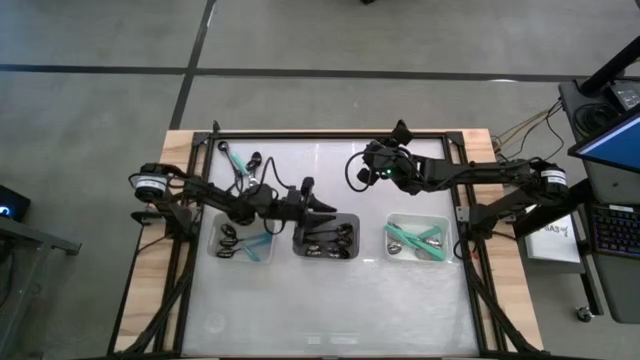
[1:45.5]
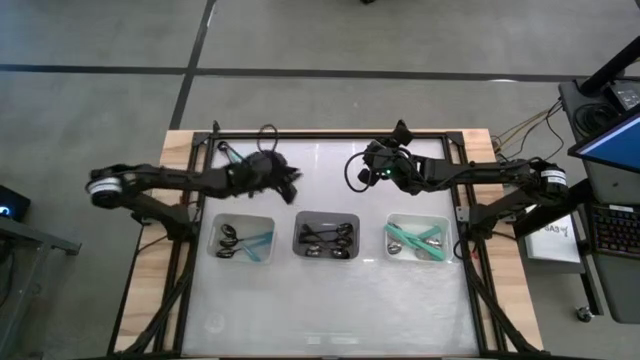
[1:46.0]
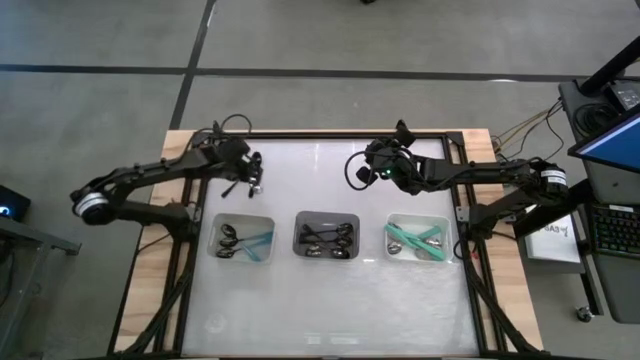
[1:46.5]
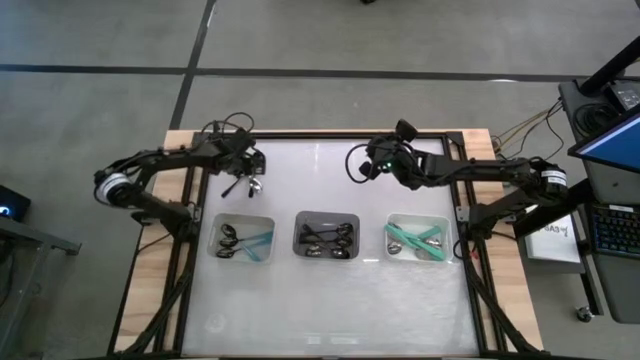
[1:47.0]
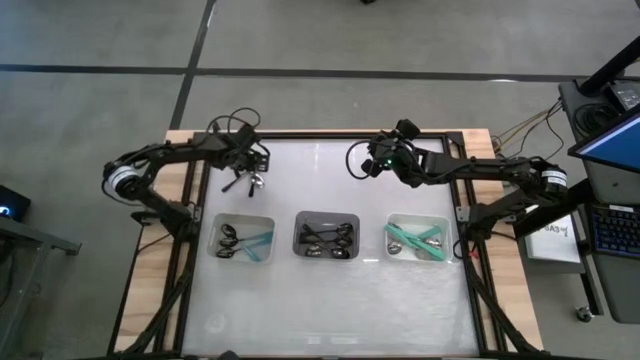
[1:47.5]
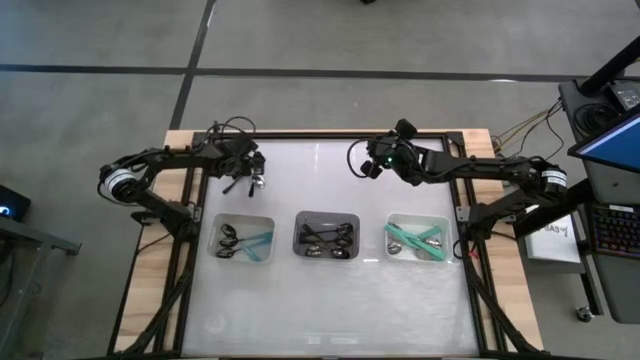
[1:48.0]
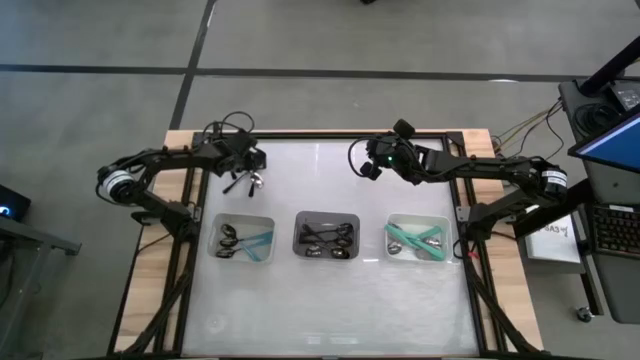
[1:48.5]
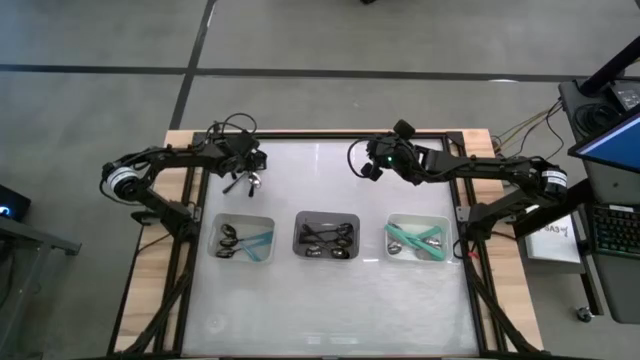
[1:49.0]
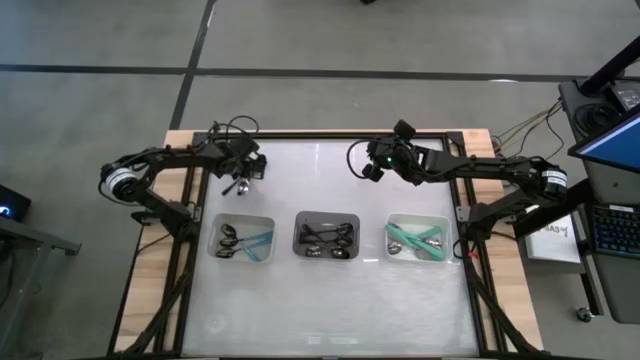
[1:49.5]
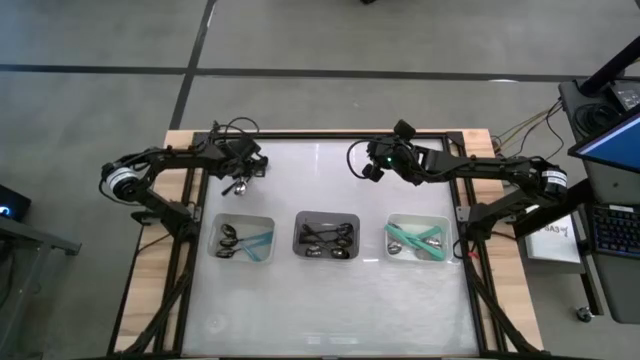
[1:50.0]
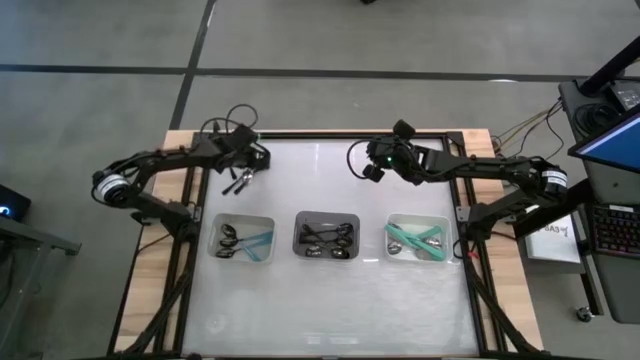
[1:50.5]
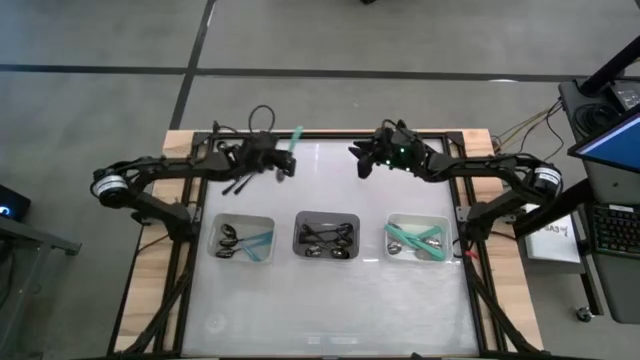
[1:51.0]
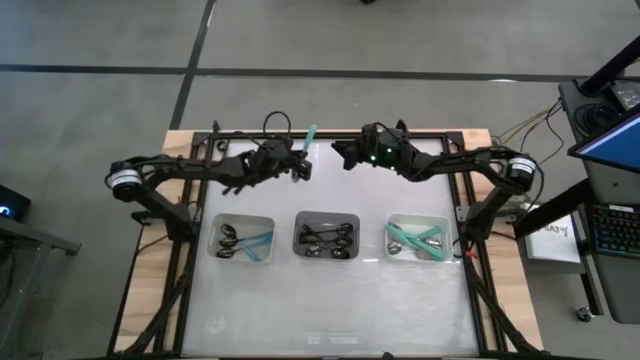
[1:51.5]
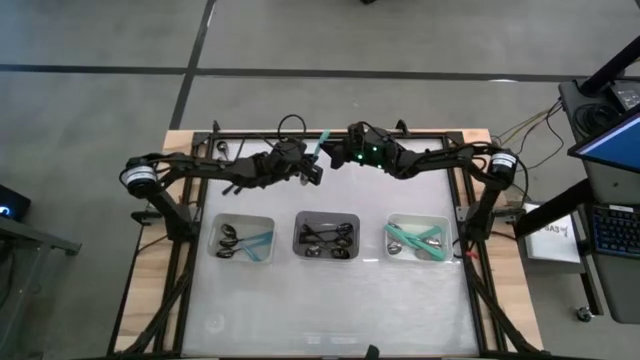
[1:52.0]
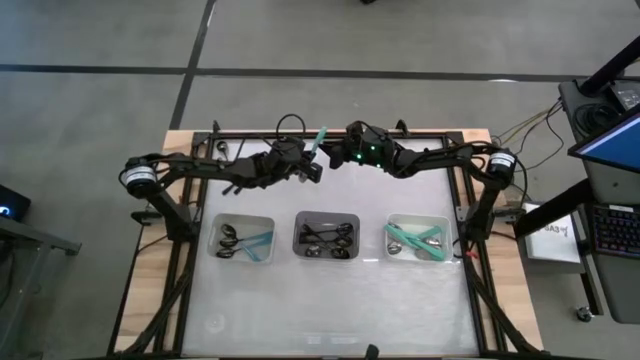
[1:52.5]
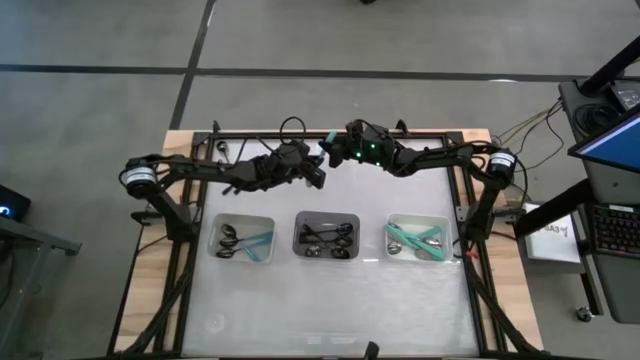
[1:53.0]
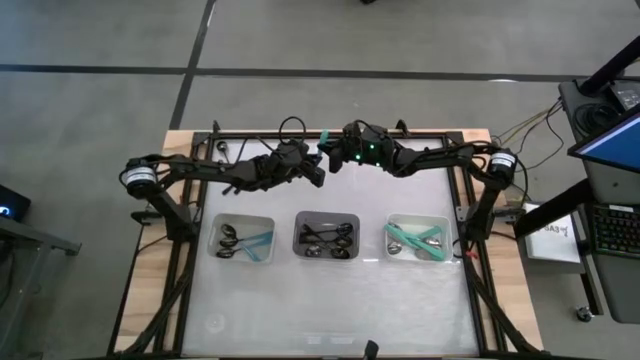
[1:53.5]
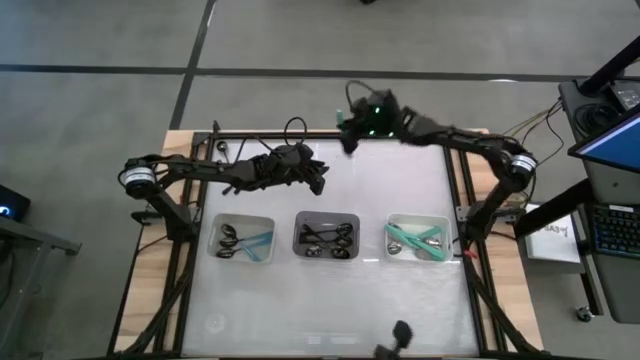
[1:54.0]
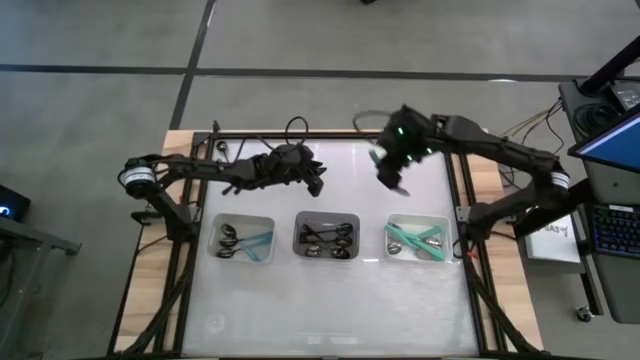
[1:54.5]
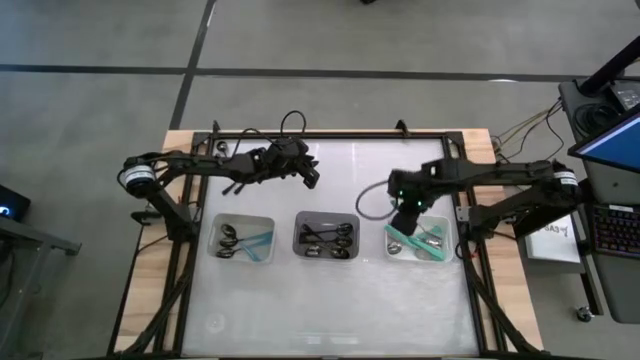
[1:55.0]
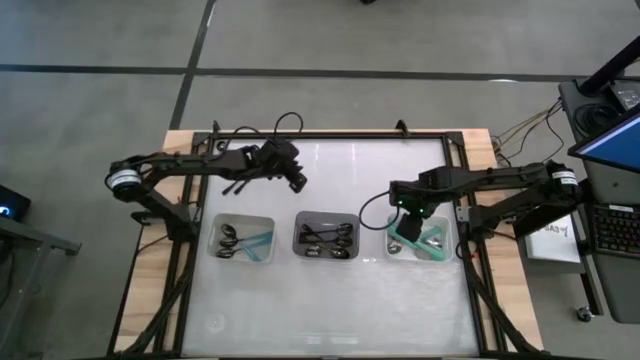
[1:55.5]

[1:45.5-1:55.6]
Task: Sort silverware by color (type)
Put the green spoon into the white bin

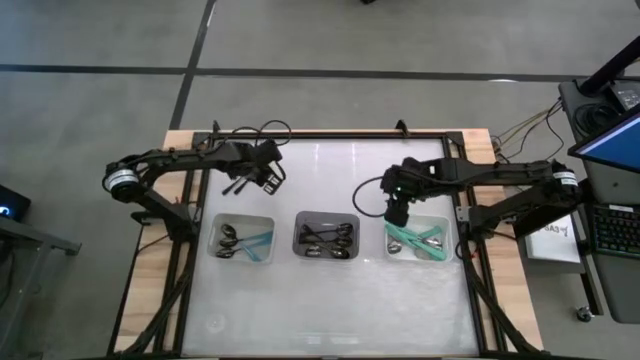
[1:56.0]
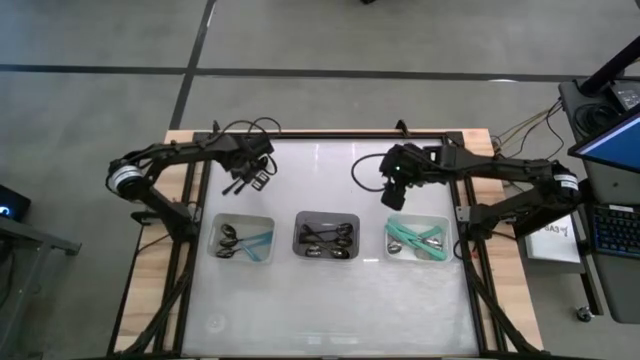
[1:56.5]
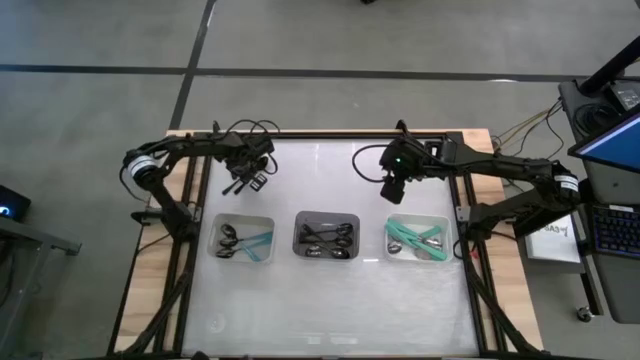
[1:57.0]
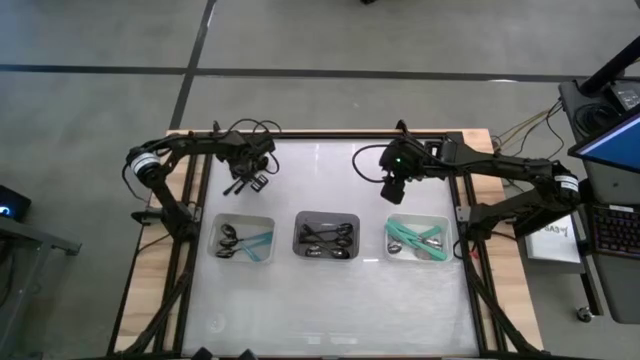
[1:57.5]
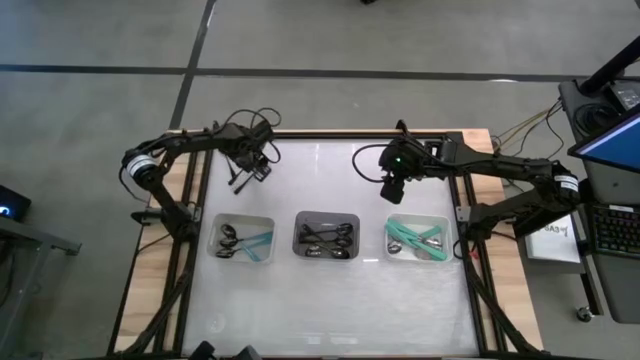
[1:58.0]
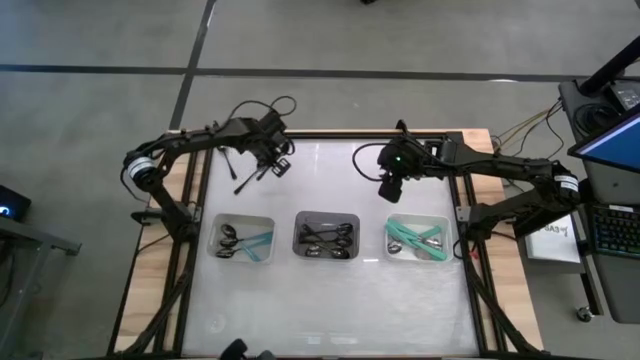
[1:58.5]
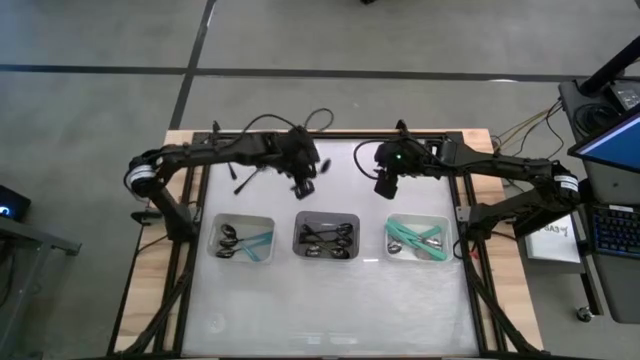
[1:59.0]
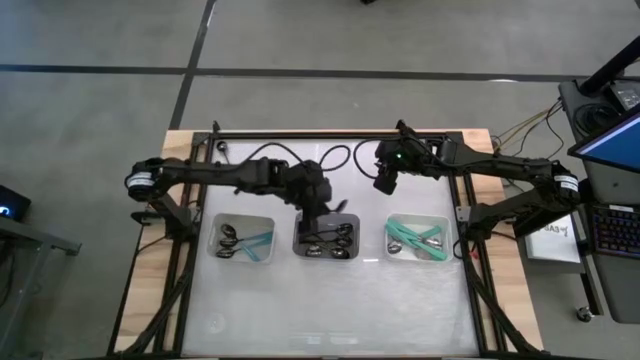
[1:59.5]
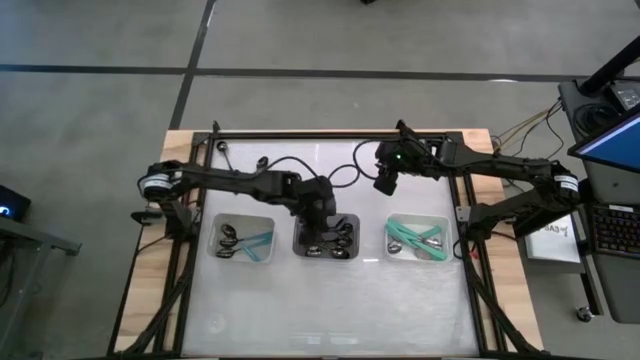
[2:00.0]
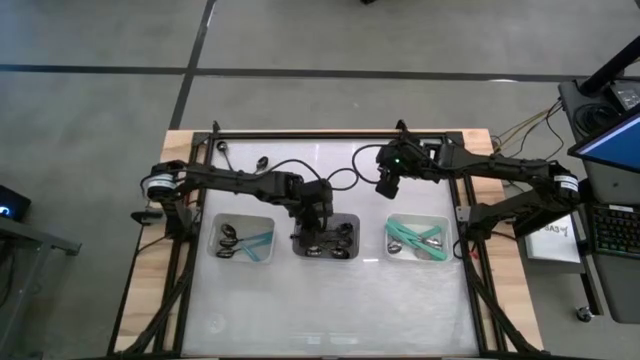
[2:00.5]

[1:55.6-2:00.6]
Put the black spoon into the black bin

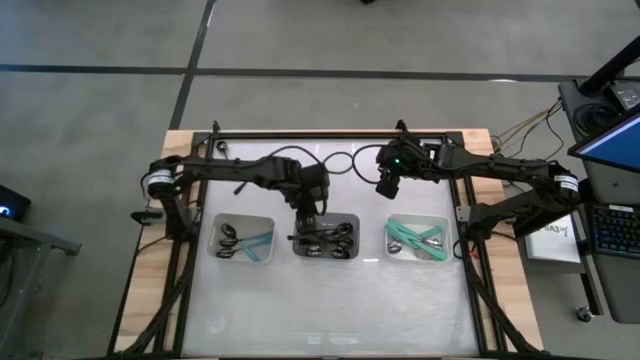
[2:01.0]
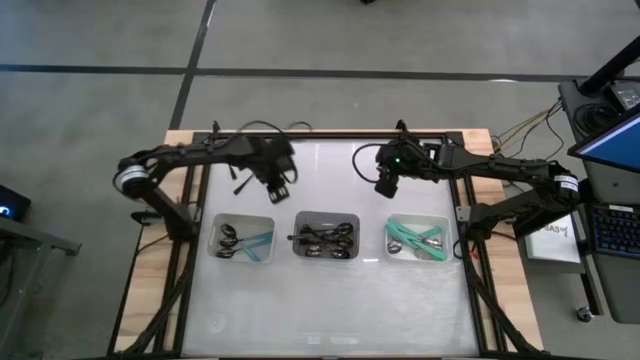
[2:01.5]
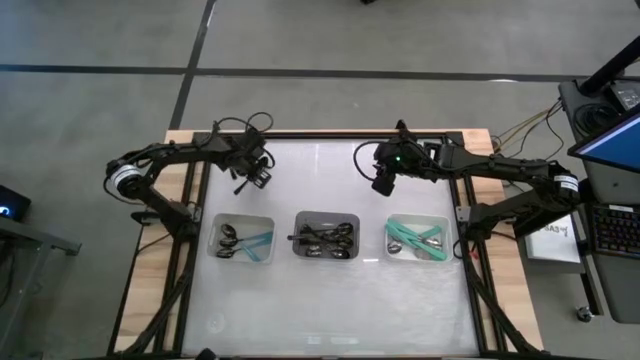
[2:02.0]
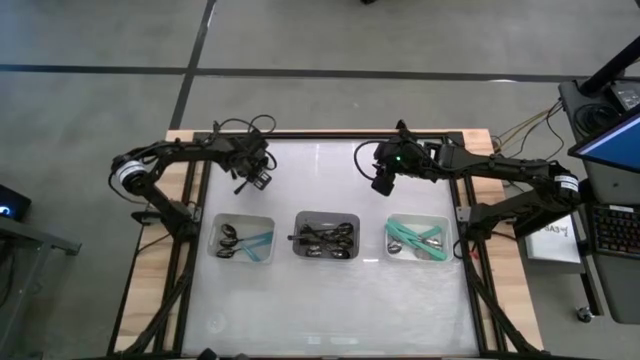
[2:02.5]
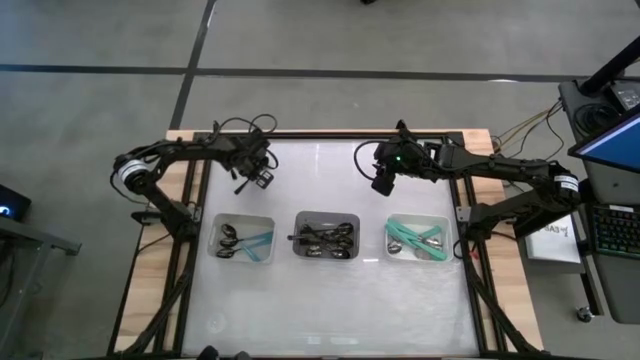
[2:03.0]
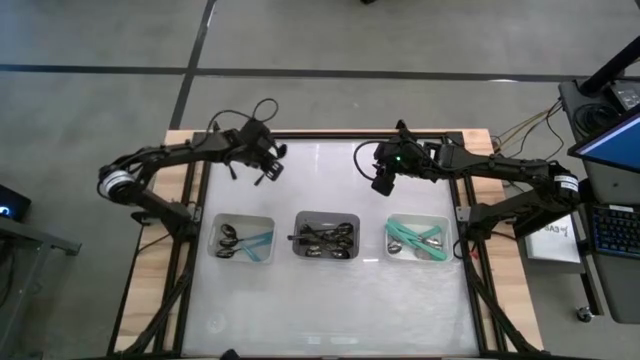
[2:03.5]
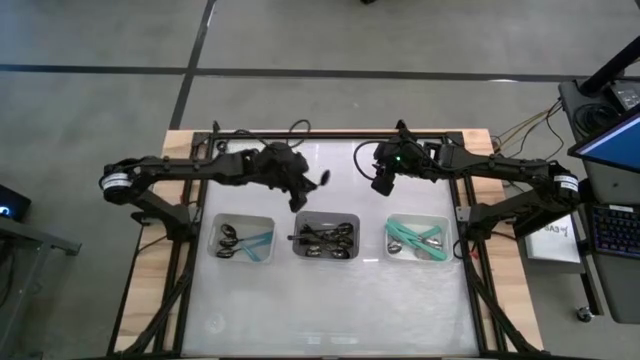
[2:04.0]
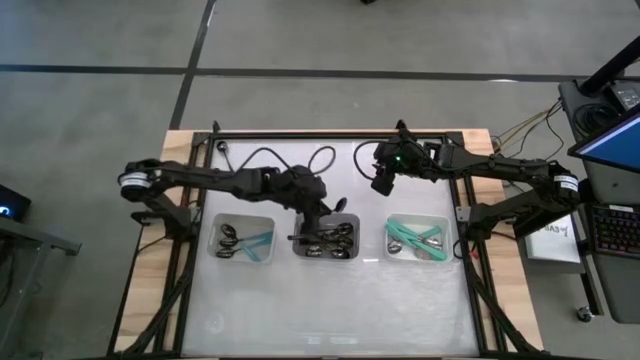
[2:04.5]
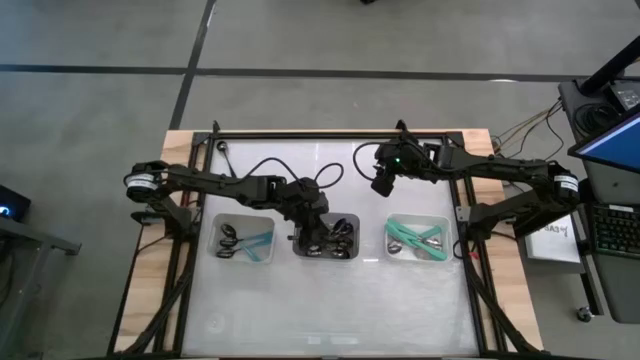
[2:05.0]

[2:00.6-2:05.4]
Put the black spoon into the black bin
